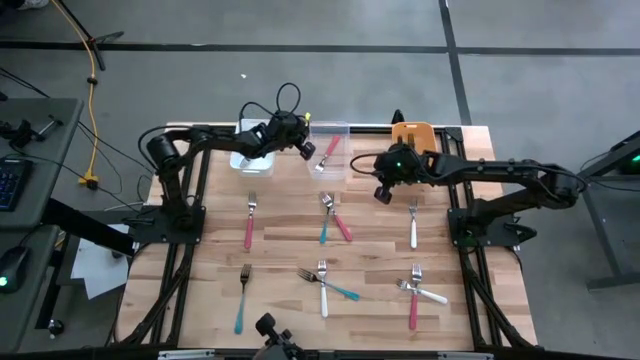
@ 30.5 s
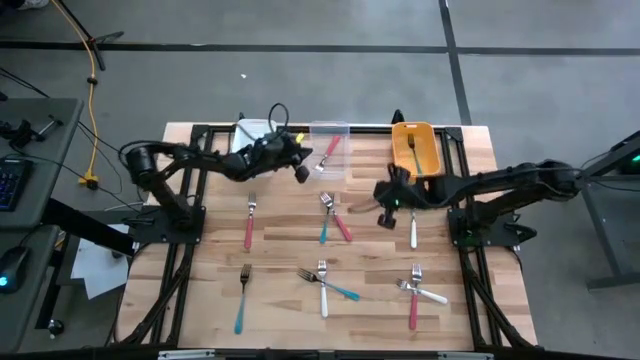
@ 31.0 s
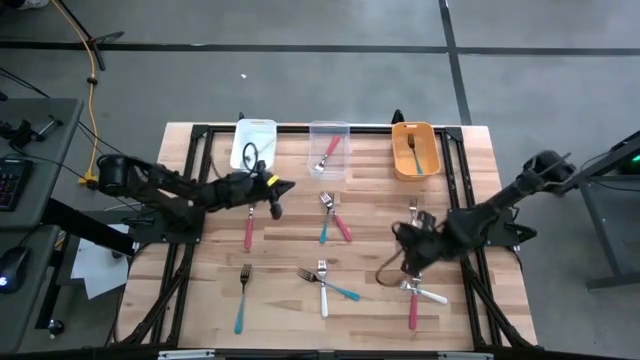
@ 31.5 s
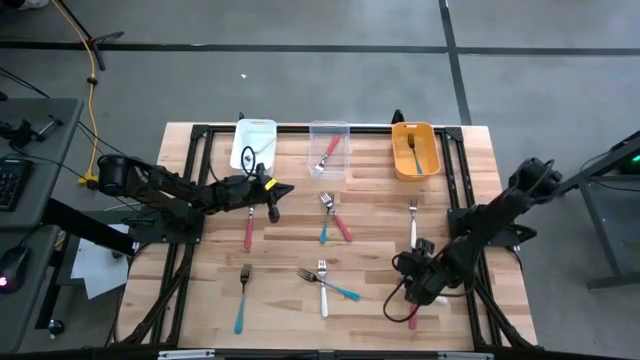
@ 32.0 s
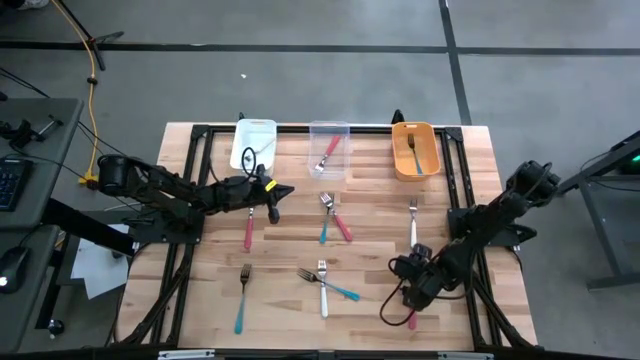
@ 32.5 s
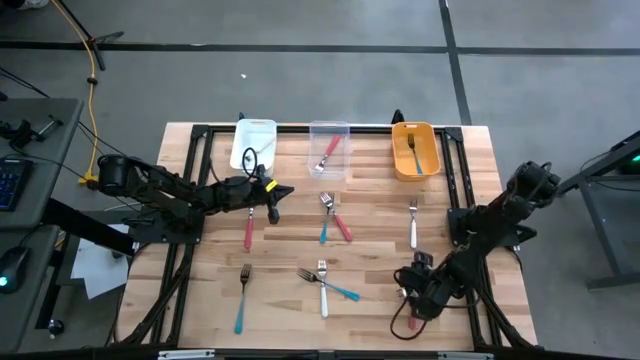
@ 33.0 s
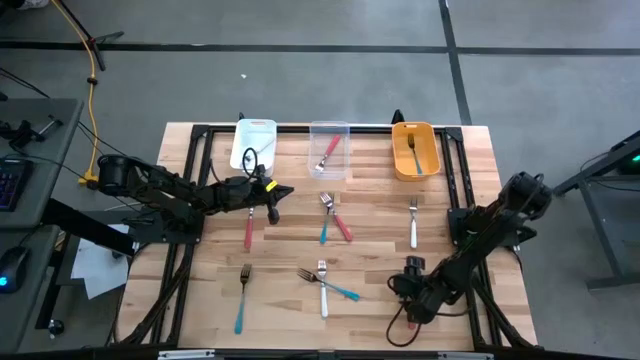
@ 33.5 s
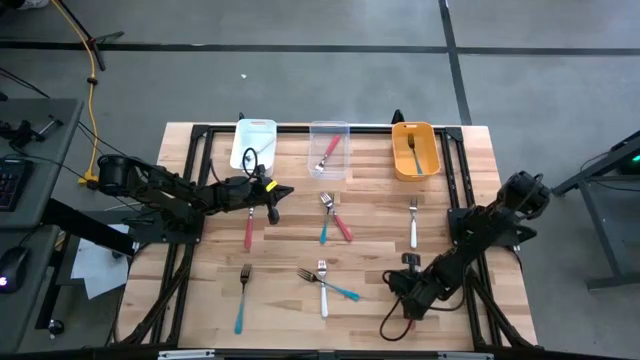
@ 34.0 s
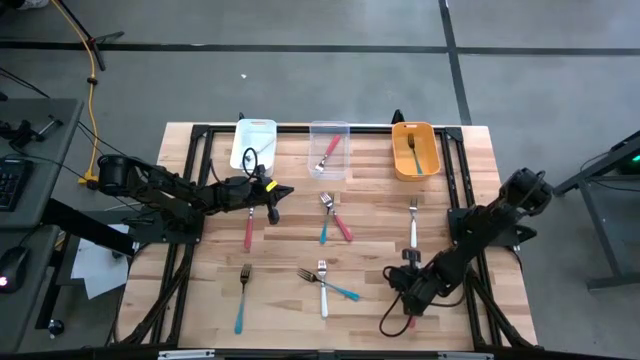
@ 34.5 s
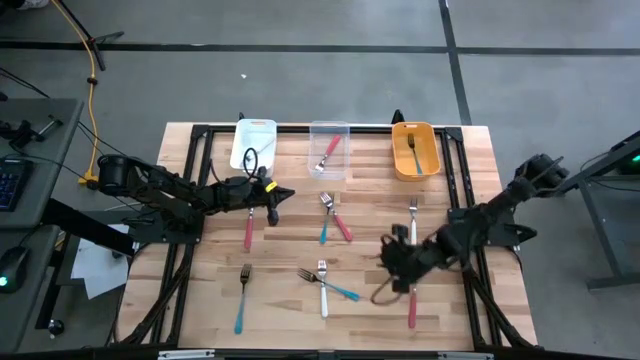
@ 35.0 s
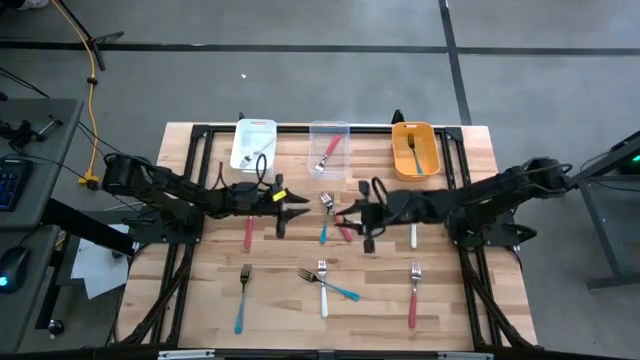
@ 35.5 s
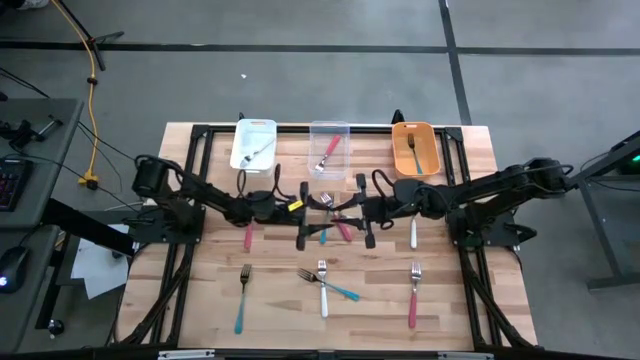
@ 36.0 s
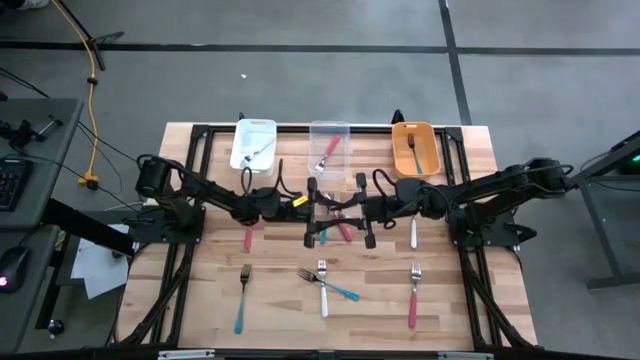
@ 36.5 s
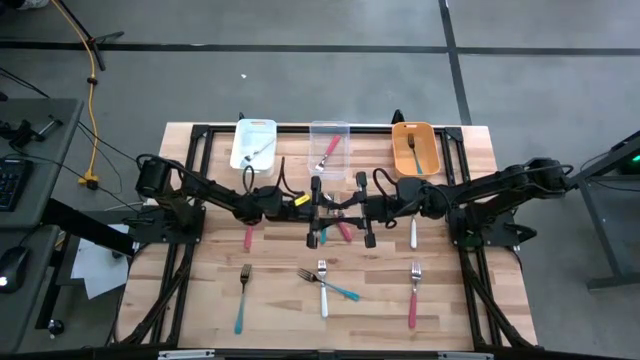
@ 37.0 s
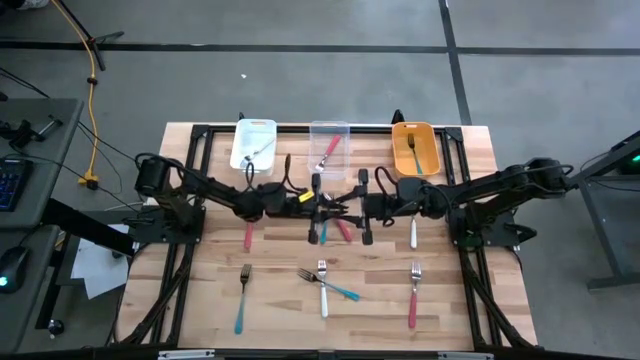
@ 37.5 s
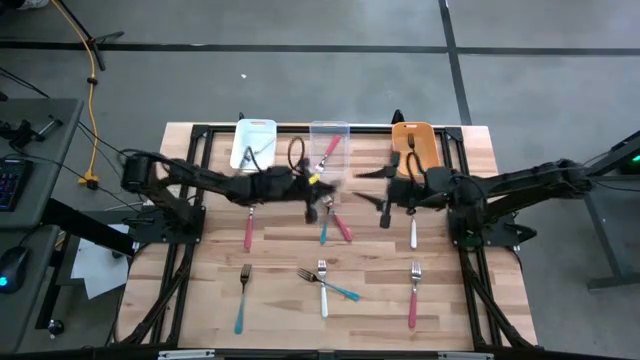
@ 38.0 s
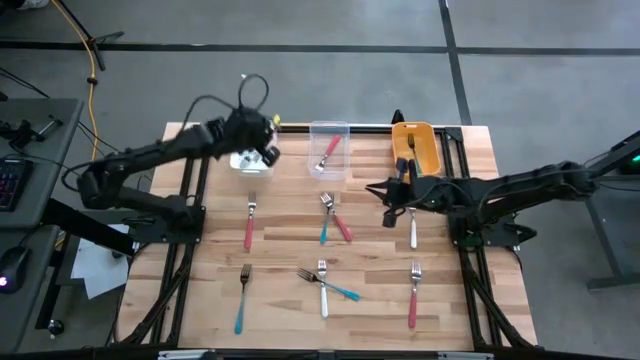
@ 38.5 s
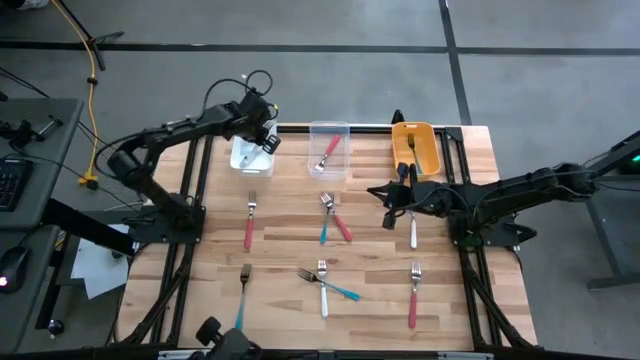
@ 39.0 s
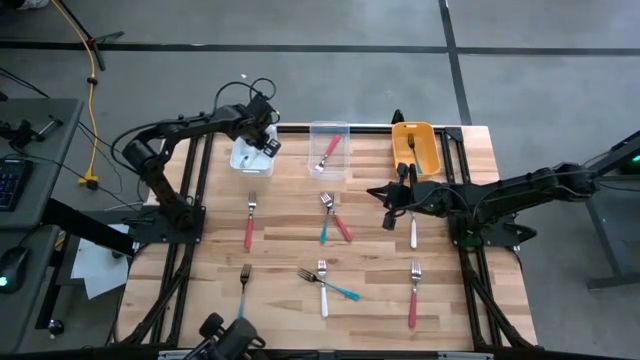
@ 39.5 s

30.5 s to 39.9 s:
Task: Sort silverware by color (type)
Put the bottom right white fork into the white bin

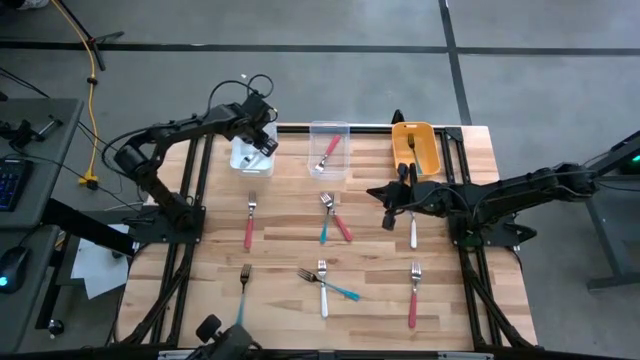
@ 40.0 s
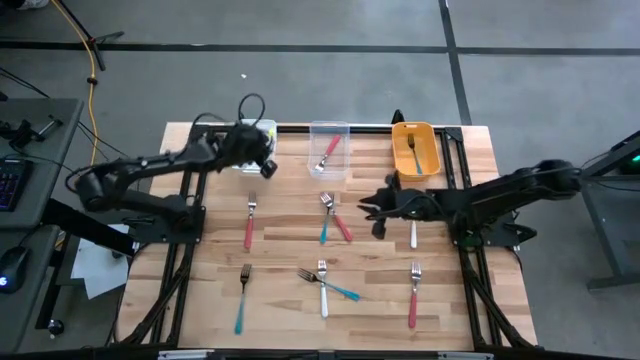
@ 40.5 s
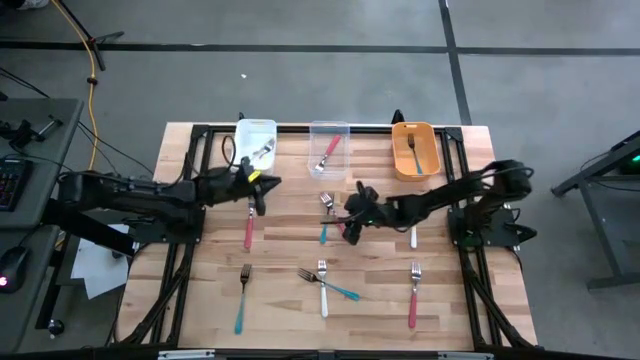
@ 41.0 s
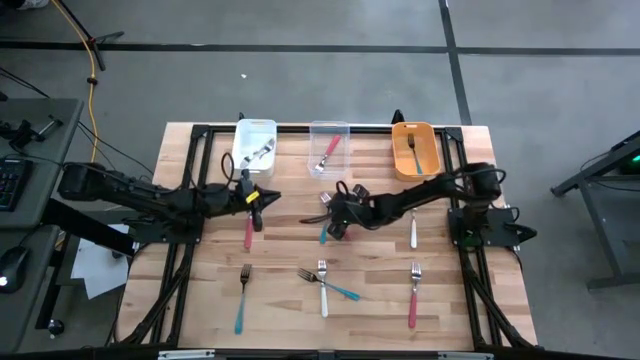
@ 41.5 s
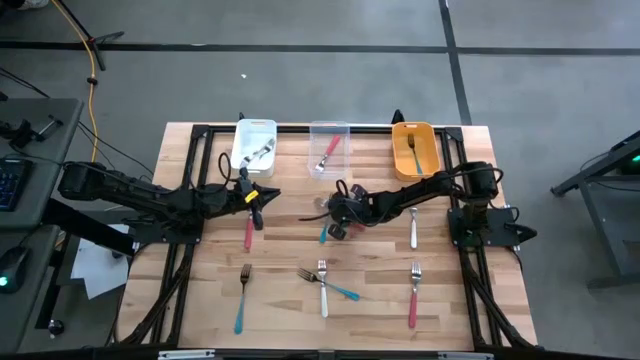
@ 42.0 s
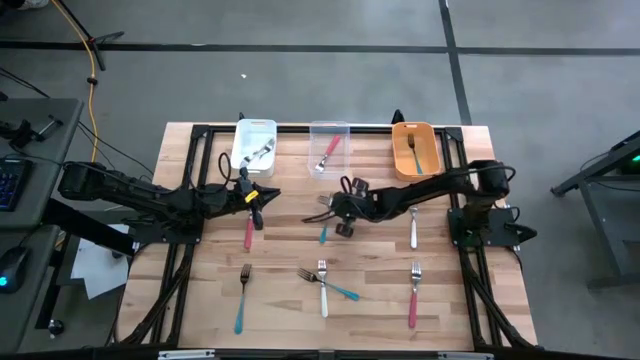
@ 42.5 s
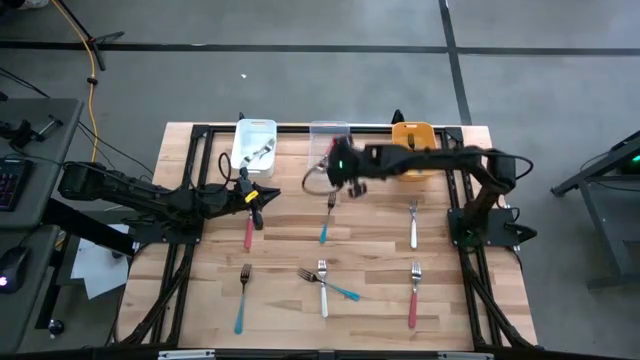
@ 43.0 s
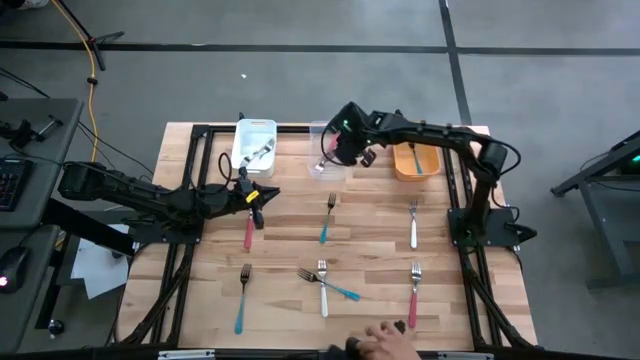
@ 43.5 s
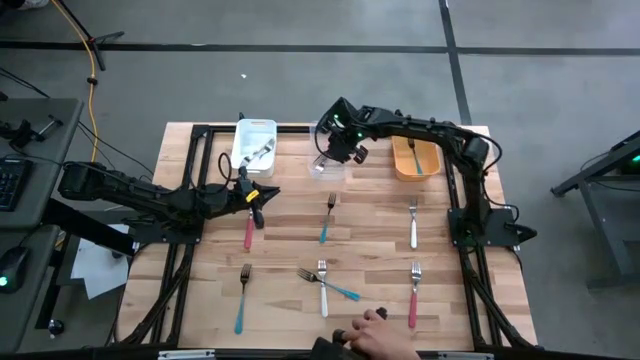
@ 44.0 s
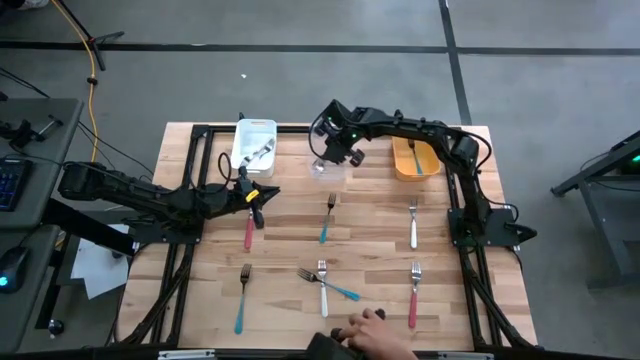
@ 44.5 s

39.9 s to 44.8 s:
Put the top right pink fork into the transparent bin

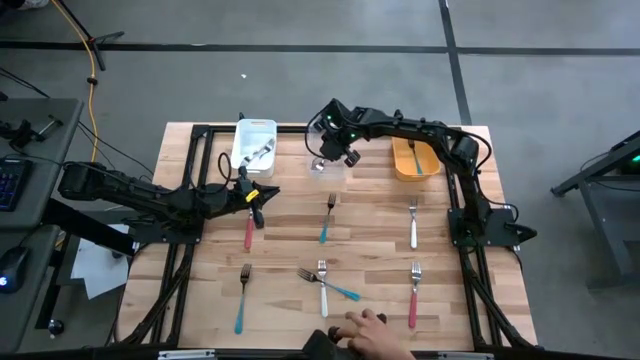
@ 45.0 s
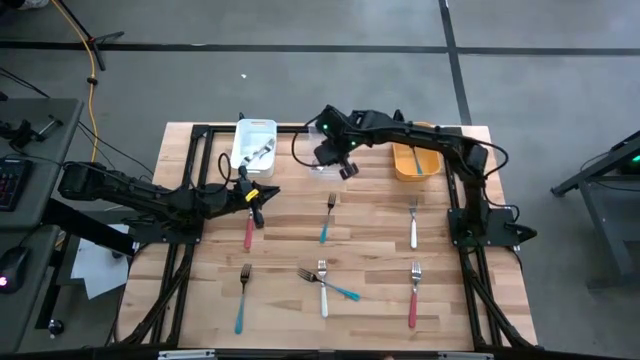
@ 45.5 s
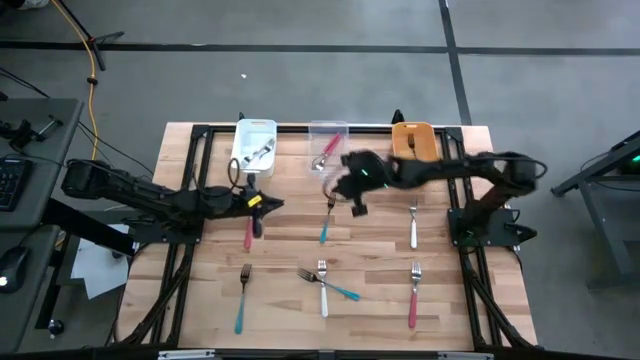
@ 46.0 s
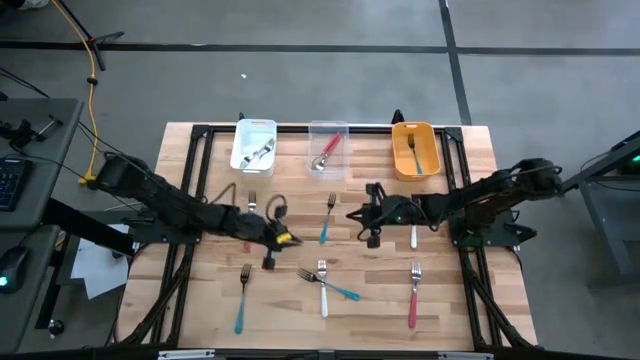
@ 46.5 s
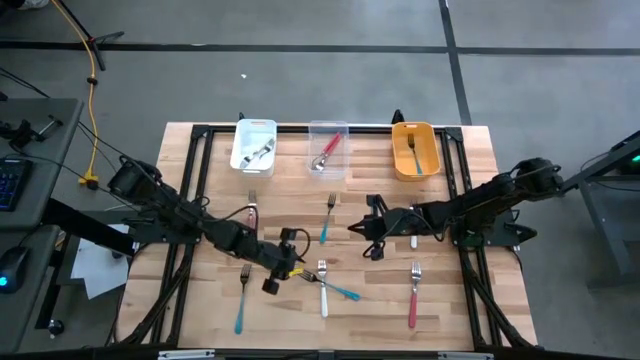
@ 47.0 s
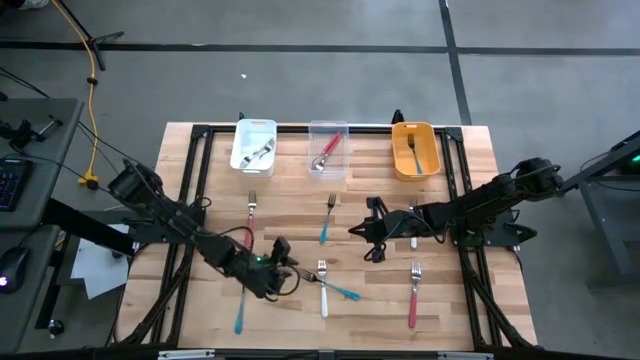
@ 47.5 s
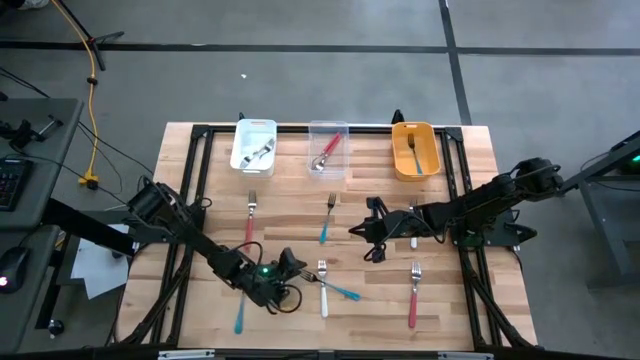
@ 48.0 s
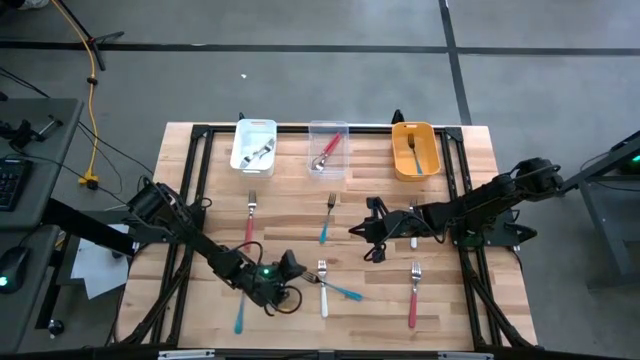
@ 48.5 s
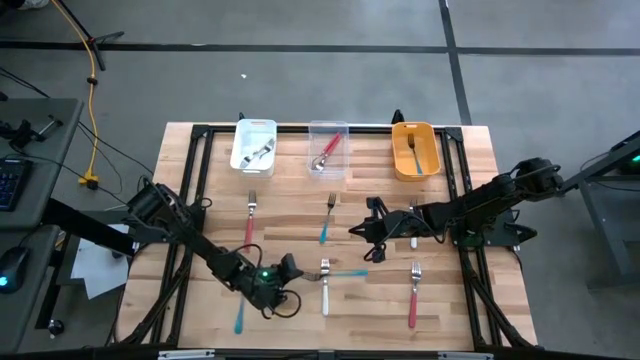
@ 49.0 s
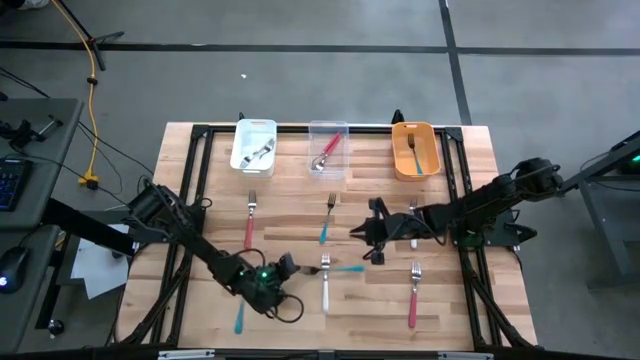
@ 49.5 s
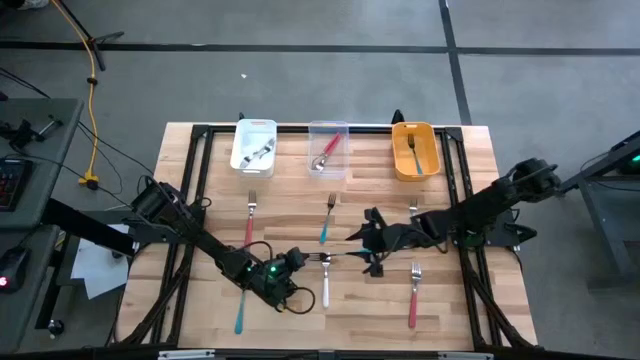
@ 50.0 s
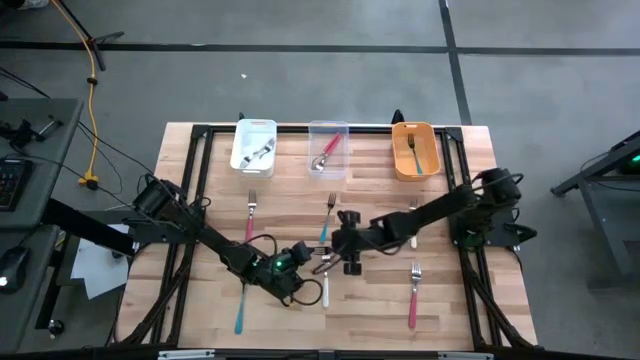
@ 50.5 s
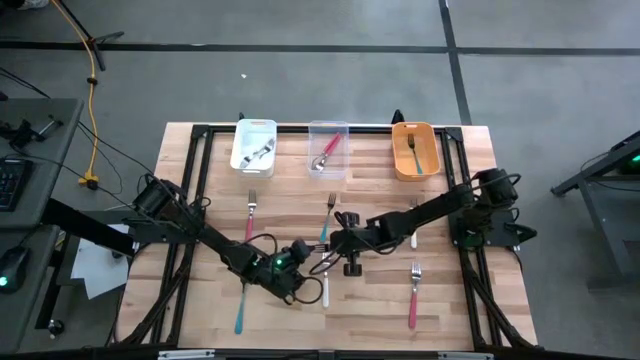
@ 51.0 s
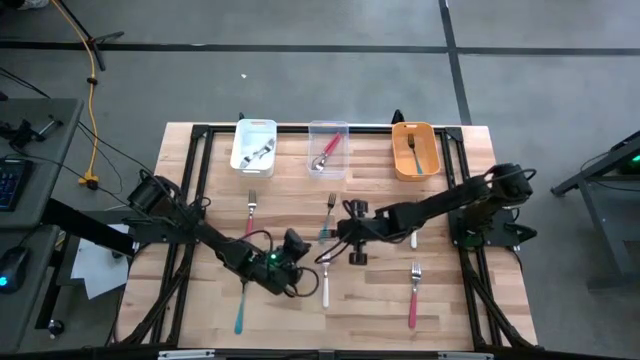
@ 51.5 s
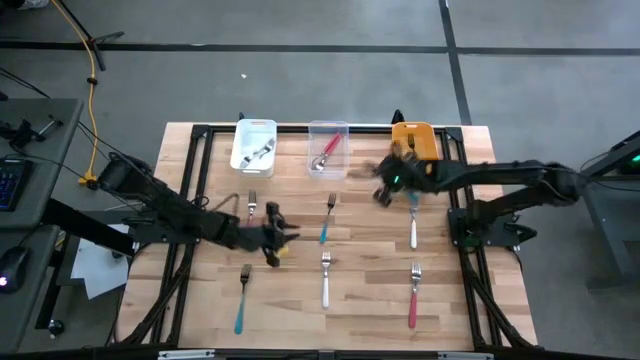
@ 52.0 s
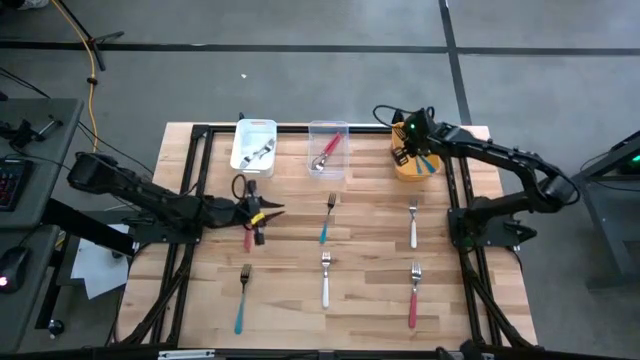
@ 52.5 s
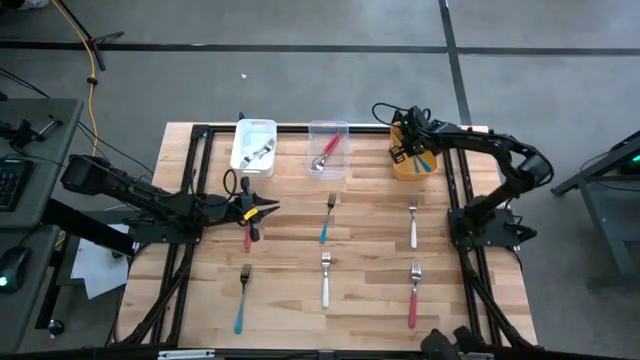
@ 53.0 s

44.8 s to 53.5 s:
Put the bottom right blue fork into the yellow bin
